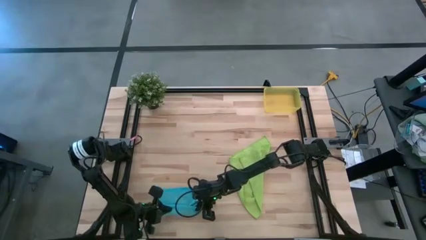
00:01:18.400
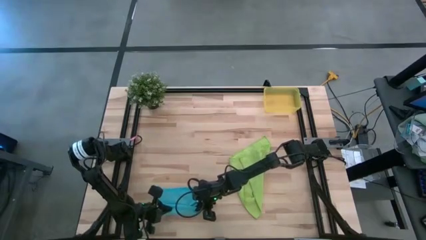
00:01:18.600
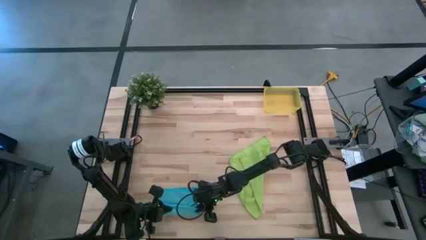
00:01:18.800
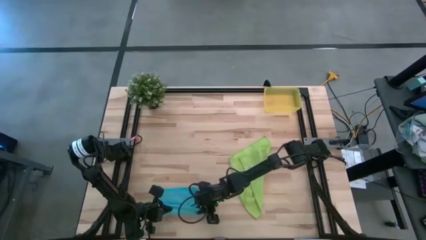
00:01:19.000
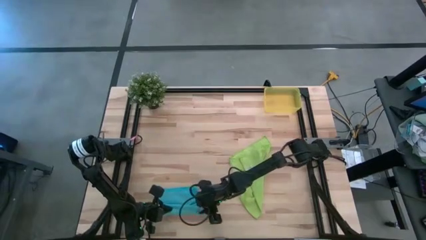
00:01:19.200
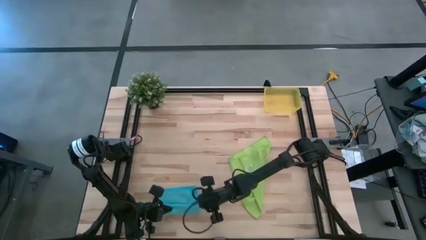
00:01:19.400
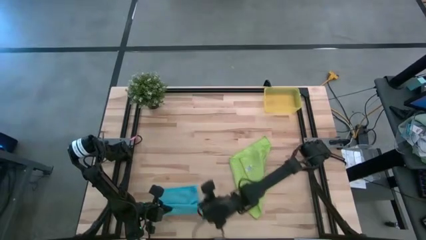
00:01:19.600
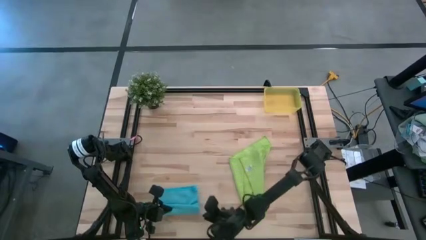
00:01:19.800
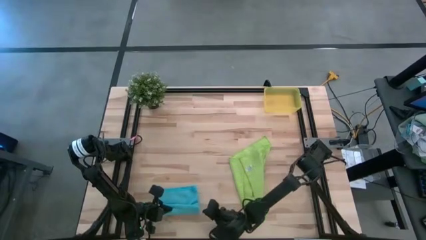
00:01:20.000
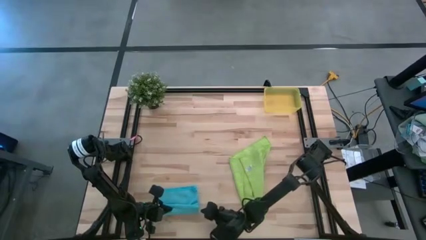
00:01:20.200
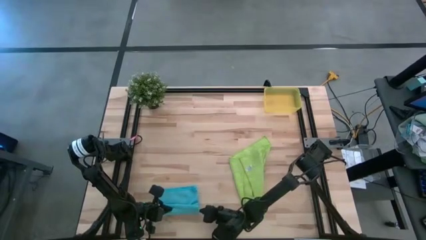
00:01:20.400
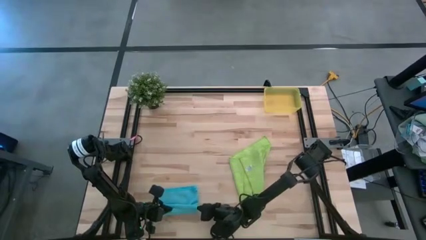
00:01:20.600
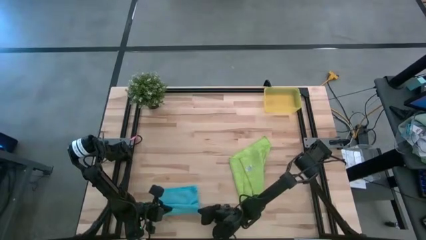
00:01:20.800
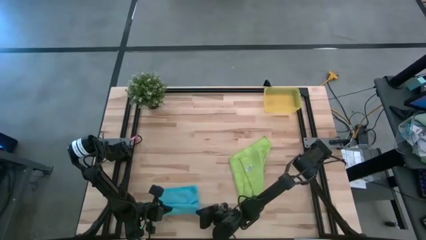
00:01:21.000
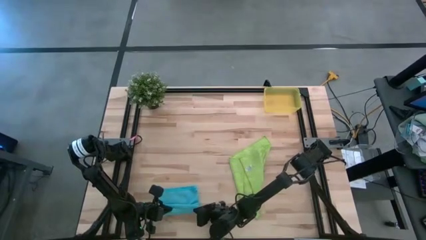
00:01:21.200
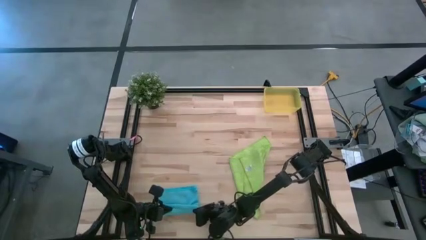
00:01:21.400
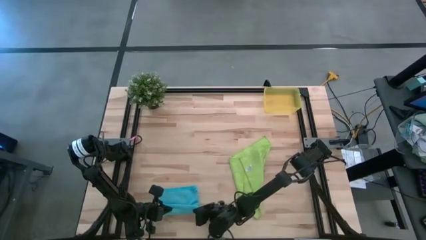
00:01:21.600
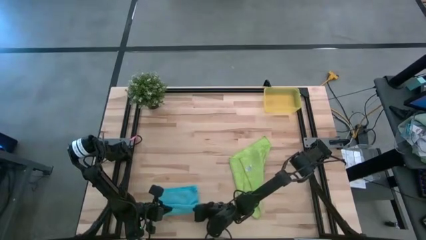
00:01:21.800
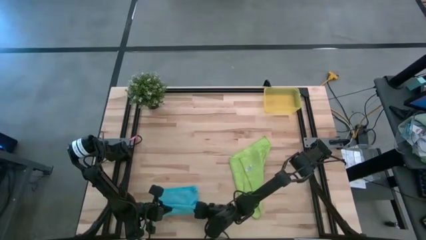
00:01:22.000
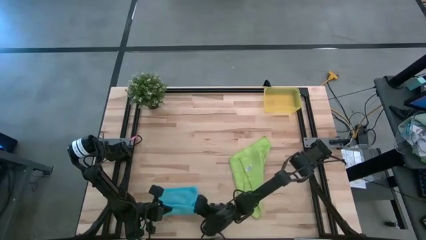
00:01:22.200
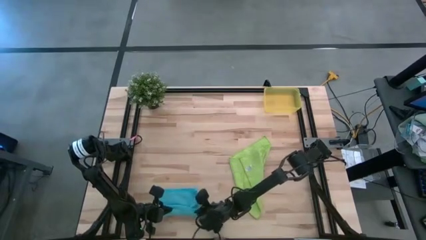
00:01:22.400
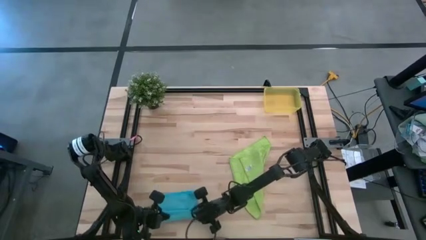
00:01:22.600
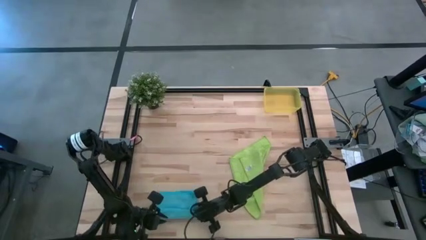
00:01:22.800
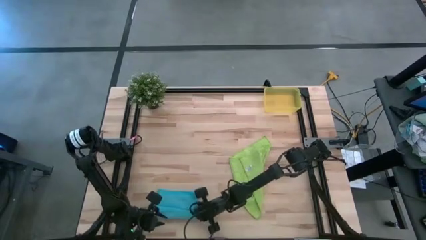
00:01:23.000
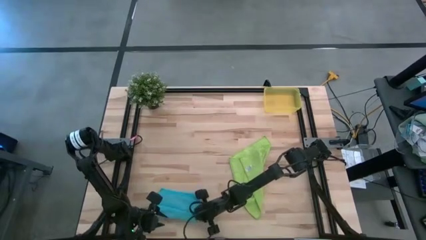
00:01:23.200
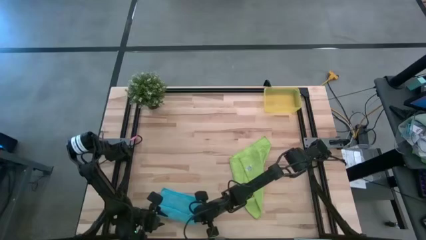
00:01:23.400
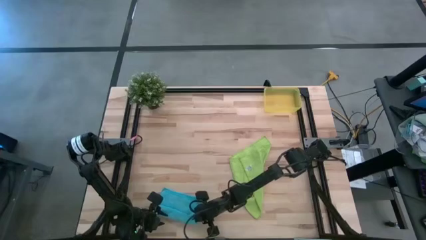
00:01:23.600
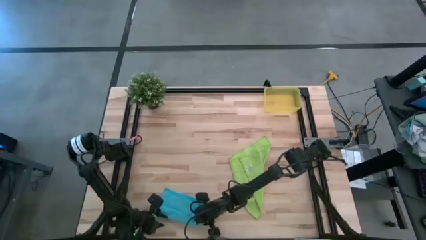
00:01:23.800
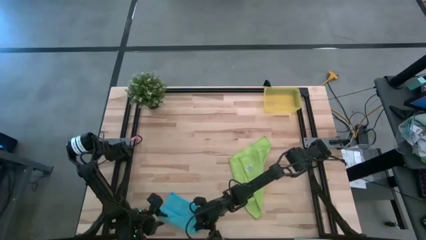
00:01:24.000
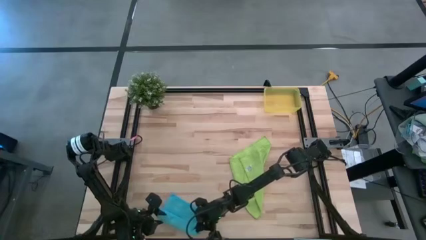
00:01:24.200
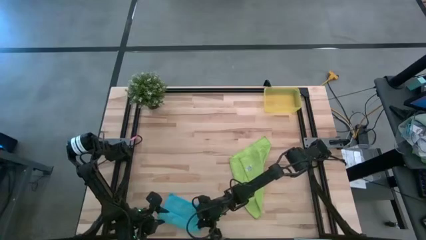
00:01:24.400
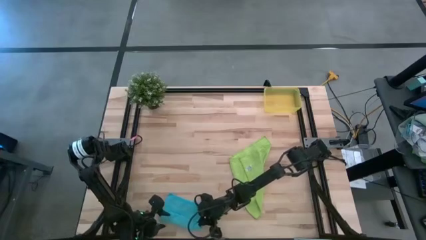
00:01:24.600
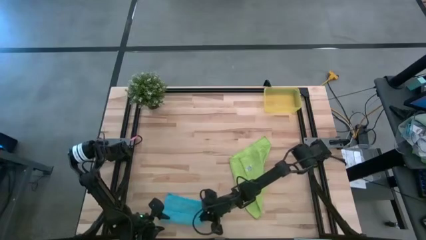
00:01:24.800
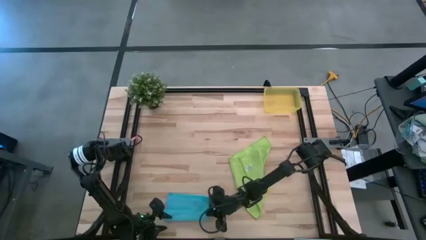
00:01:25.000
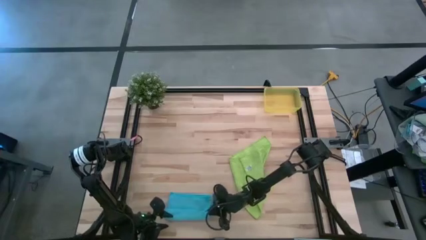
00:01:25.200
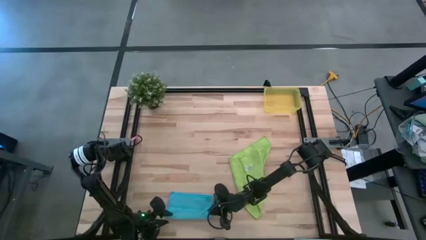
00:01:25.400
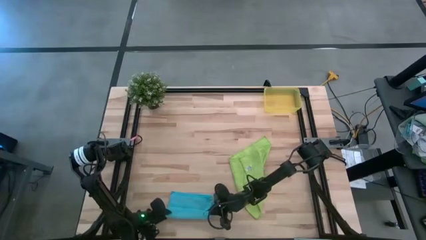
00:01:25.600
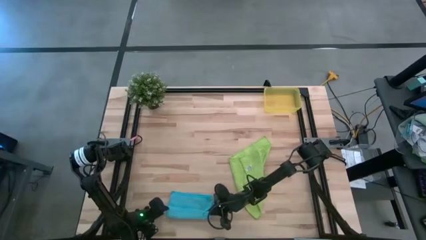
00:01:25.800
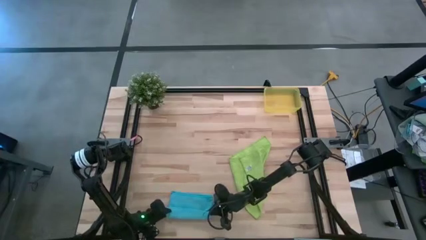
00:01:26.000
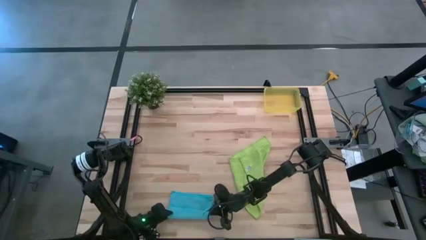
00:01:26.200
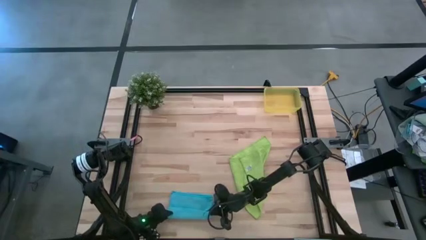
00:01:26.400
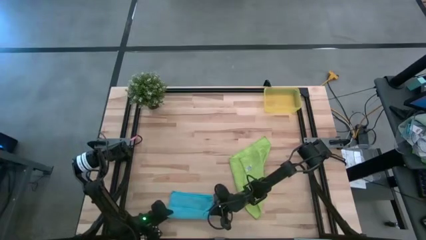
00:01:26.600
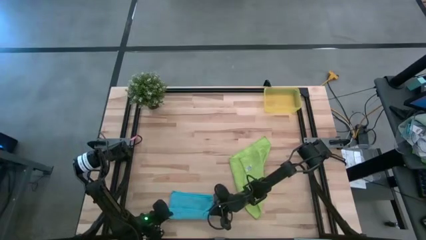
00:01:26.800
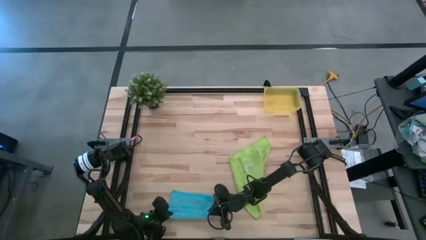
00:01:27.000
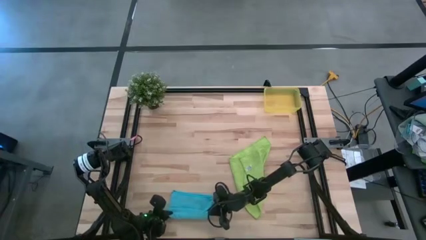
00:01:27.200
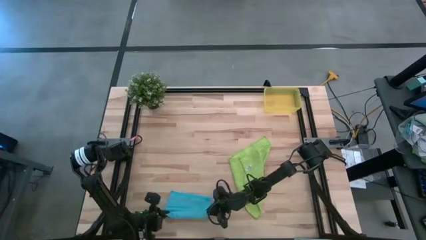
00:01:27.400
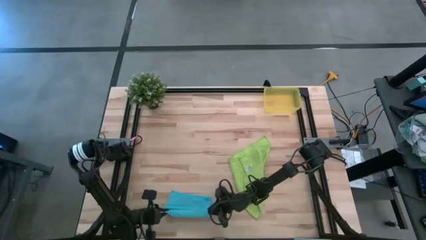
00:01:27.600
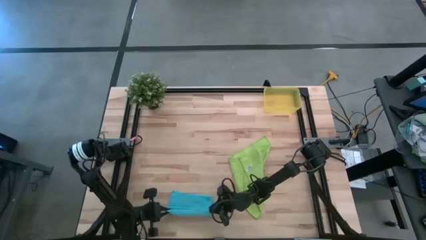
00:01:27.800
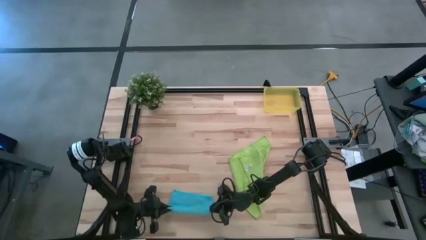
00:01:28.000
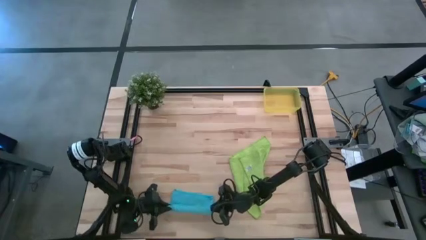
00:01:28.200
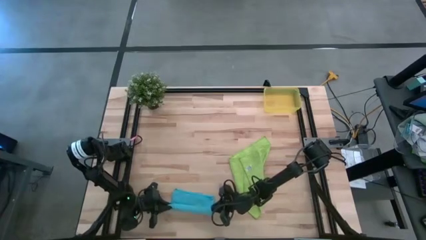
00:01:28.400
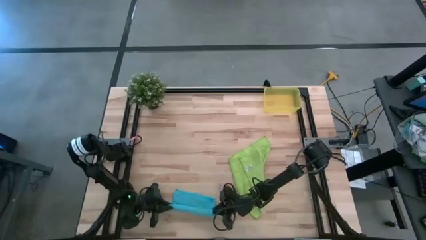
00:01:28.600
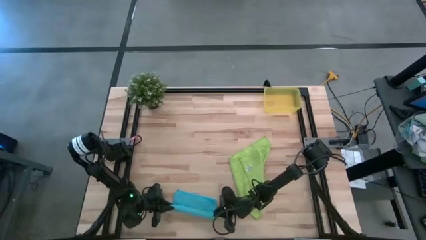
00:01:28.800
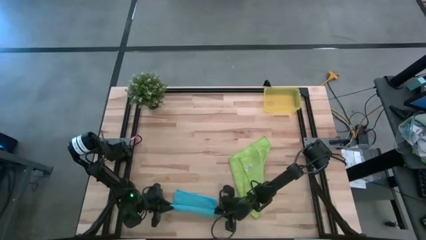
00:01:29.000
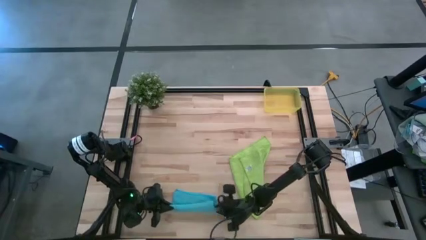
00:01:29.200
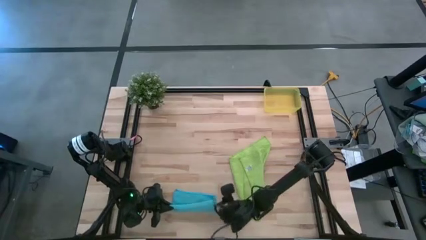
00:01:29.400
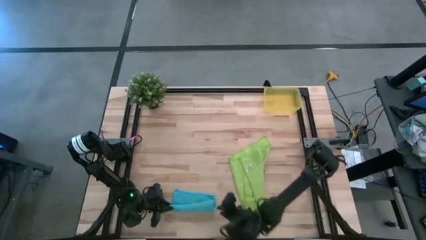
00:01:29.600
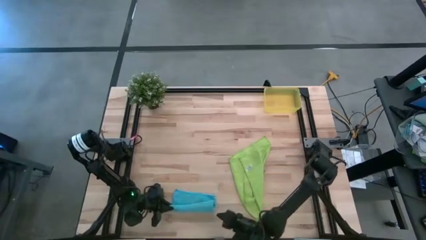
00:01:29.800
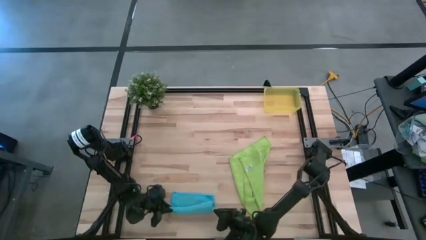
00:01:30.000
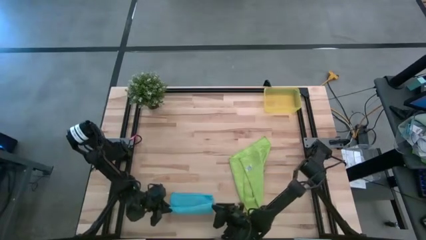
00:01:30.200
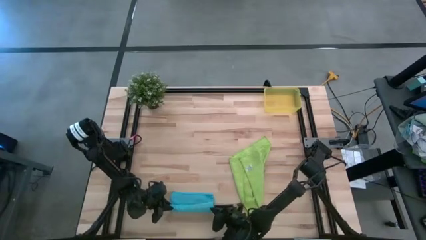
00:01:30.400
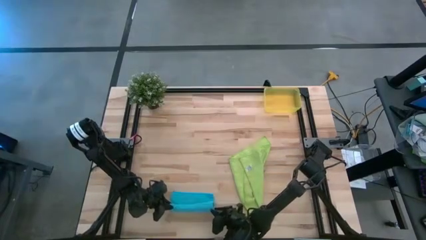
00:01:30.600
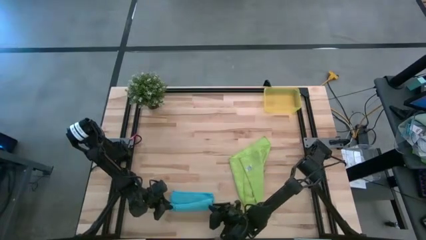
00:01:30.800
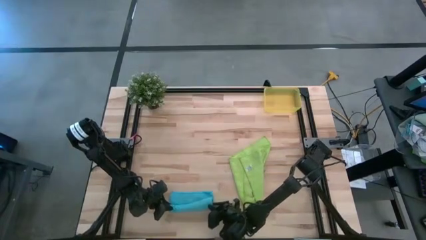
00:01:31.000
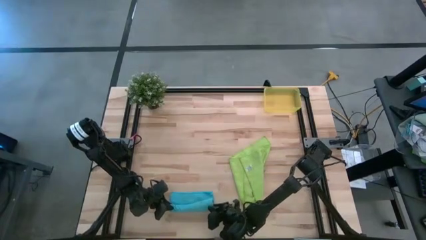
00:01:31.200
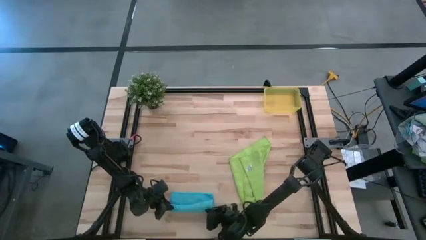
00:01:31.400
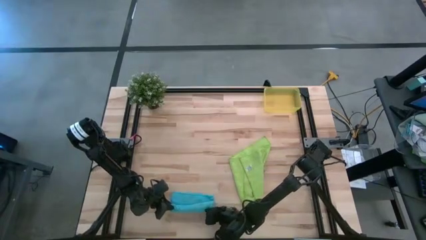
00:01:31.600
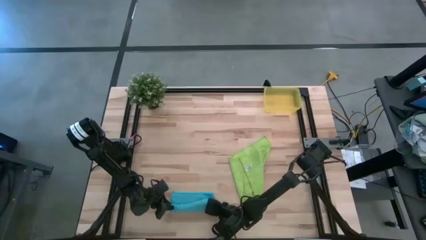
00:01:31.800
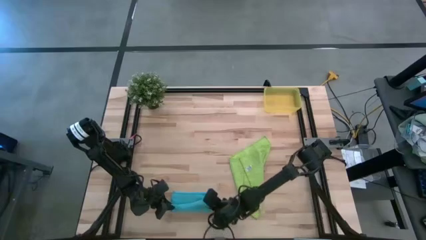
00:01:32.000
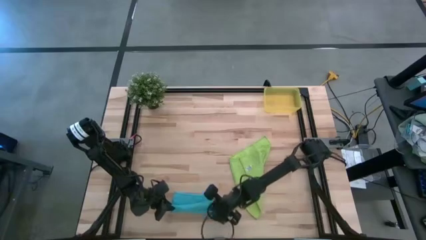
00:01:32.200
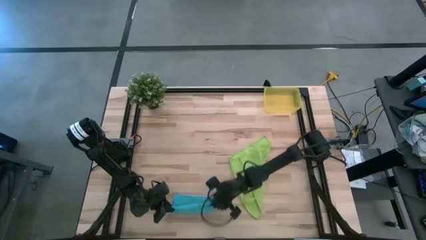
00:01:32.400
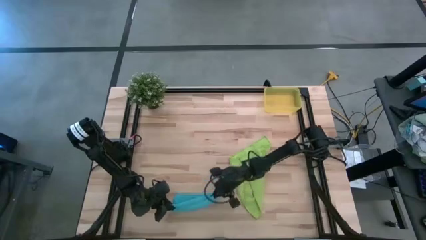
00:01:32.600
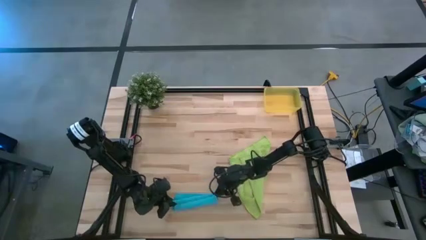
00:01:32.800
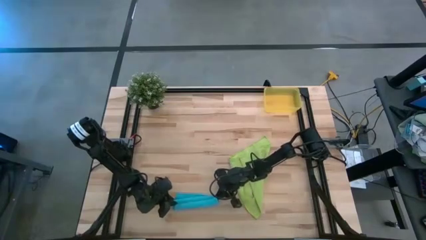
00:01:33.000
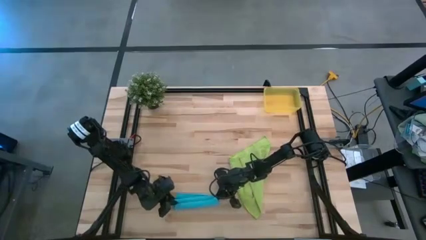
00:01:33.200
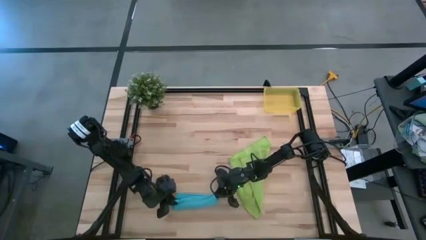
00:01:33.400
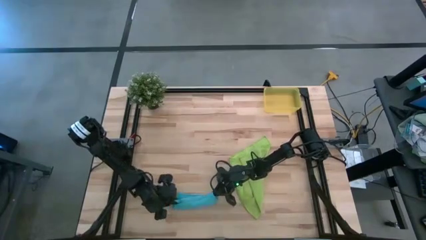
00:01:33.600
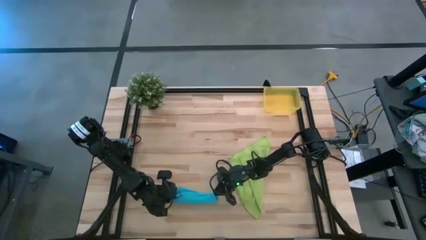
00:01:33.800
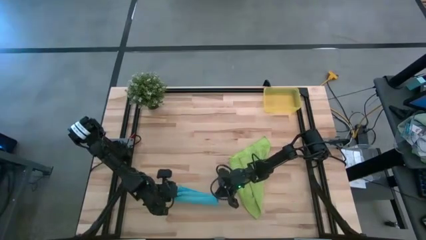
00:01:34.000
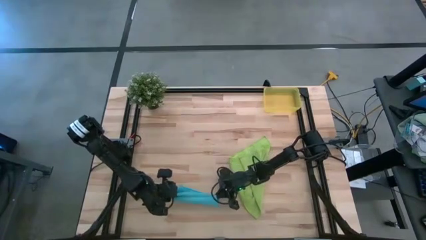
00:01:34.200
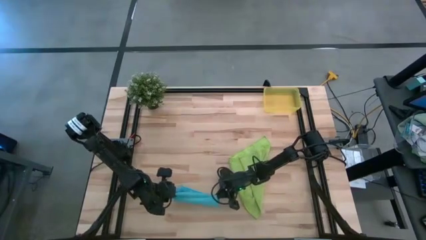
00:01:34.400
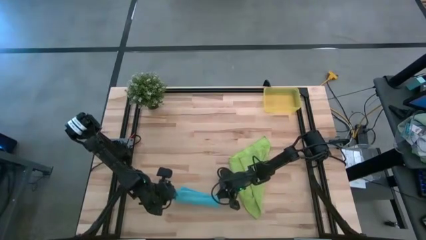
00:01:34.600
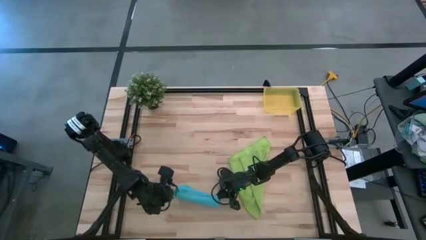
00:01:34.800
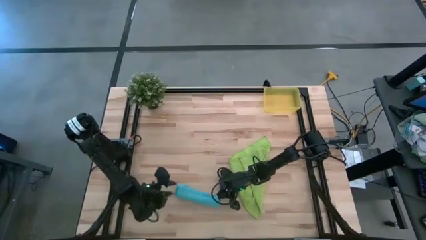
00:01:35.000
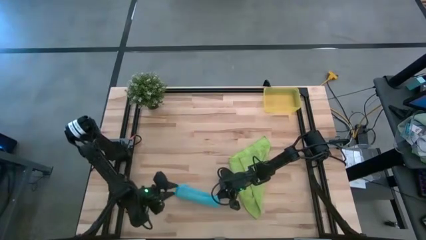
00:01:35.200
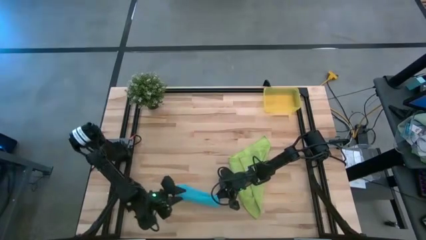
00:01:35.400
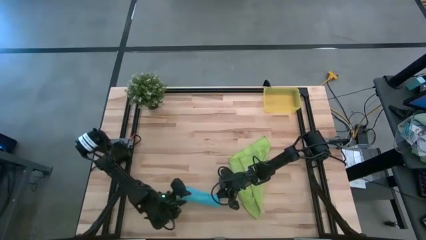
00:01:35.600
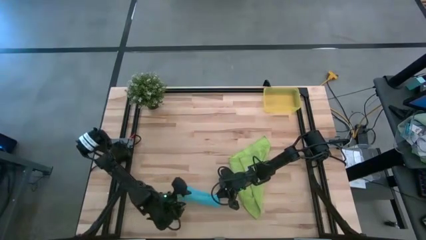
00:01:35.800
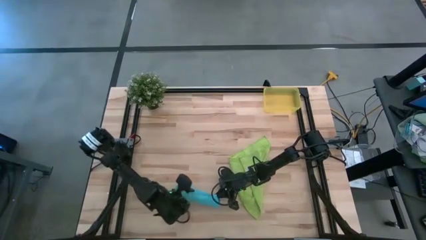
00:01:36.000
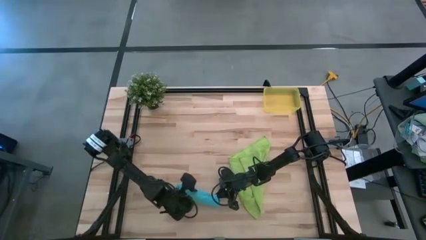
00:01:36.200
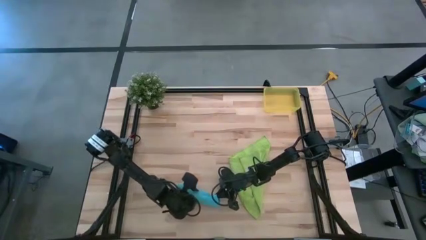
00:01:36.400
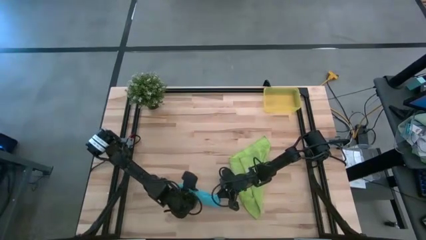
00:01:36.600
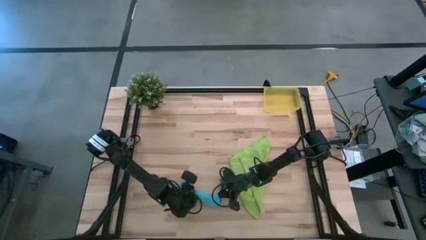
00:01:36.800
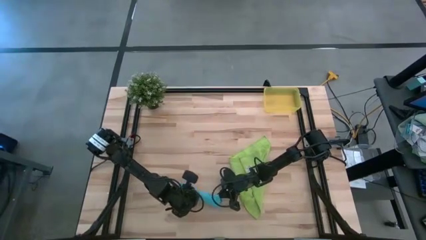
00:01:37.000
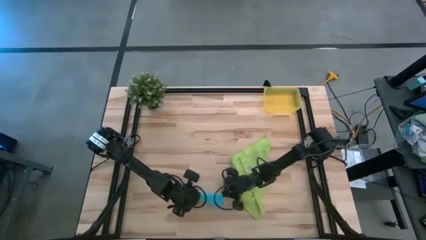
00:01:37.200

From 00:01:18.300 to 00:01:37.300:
Task: Roll microfiber towels into tight, uniform cylinder then place into a basket
Roll the blue microfiber towel
